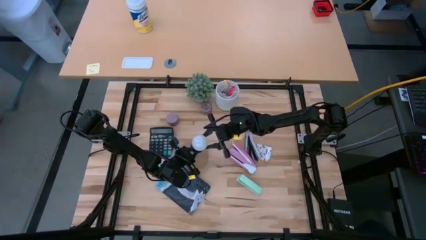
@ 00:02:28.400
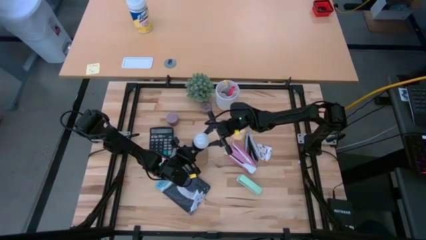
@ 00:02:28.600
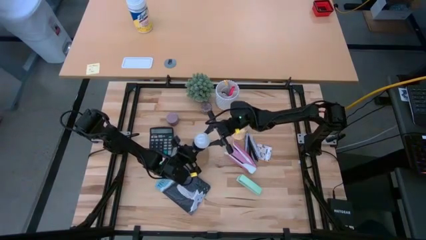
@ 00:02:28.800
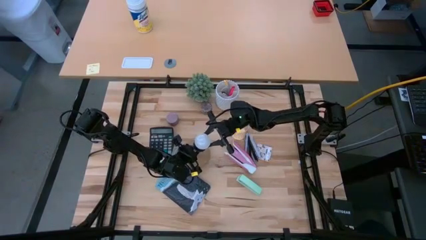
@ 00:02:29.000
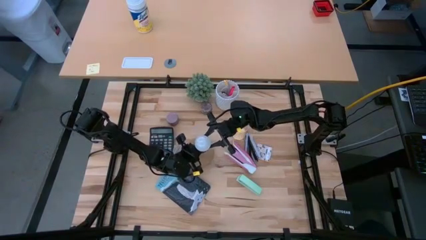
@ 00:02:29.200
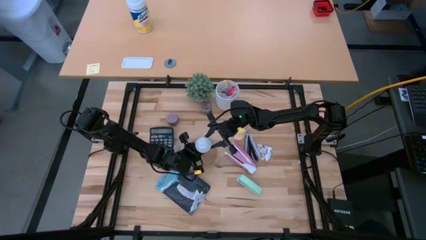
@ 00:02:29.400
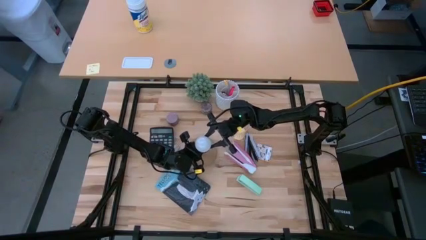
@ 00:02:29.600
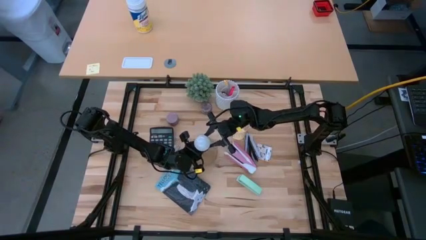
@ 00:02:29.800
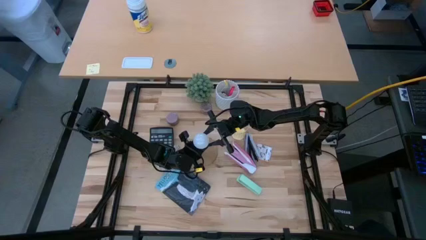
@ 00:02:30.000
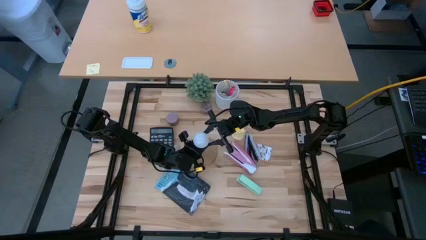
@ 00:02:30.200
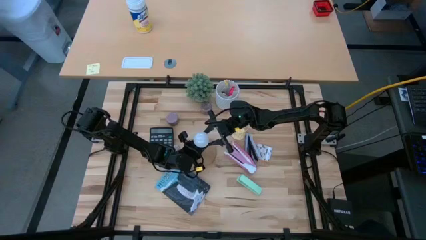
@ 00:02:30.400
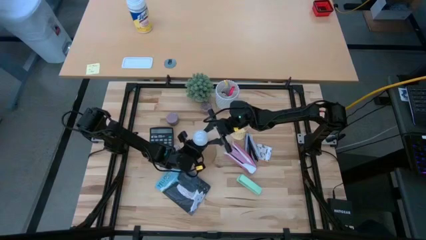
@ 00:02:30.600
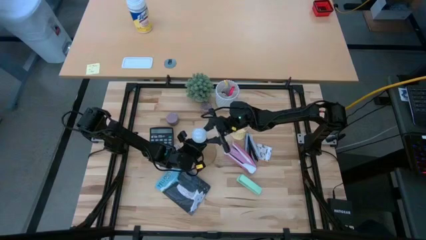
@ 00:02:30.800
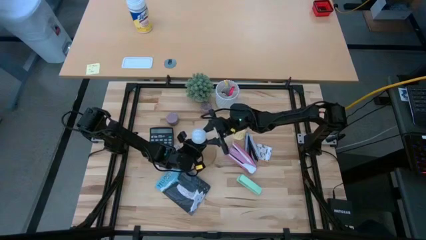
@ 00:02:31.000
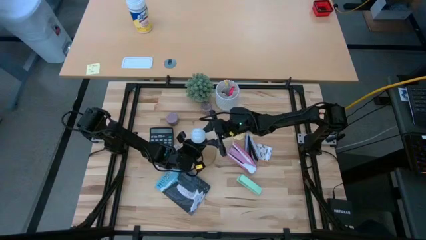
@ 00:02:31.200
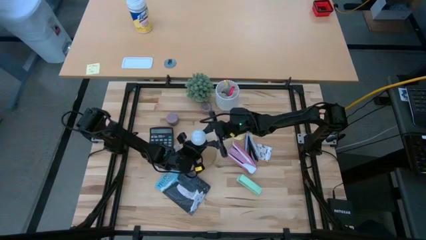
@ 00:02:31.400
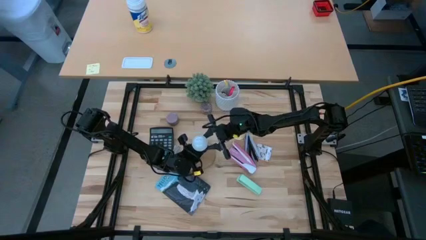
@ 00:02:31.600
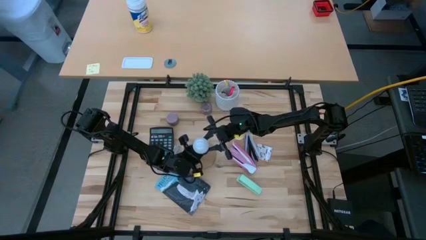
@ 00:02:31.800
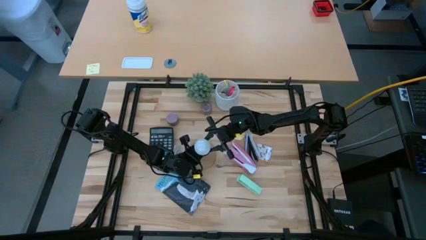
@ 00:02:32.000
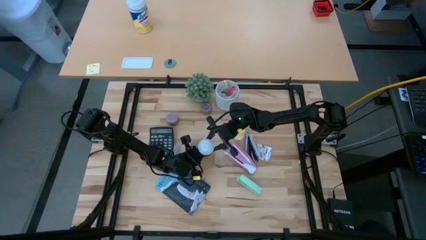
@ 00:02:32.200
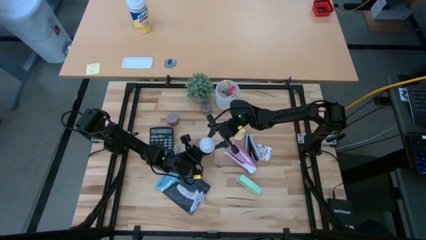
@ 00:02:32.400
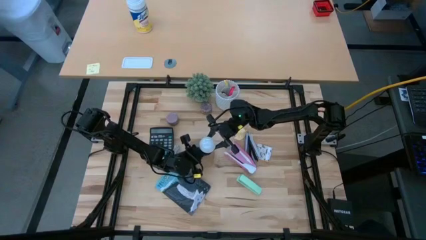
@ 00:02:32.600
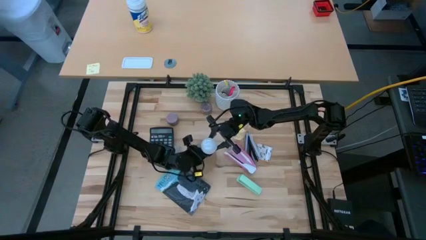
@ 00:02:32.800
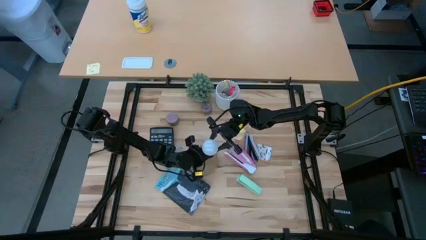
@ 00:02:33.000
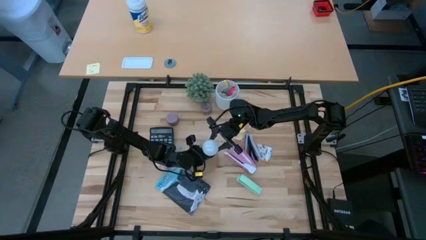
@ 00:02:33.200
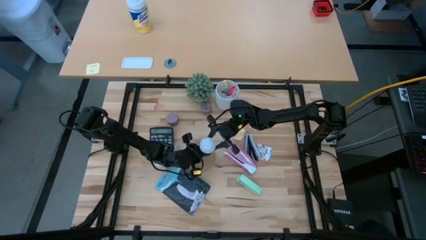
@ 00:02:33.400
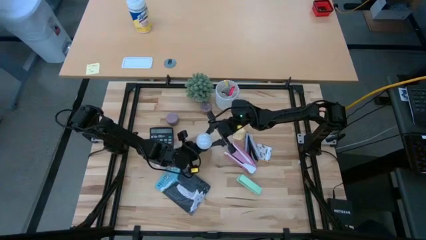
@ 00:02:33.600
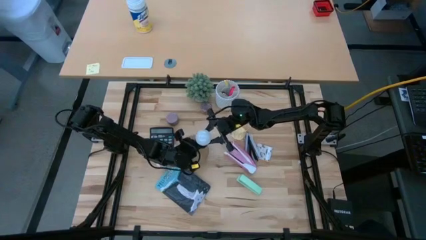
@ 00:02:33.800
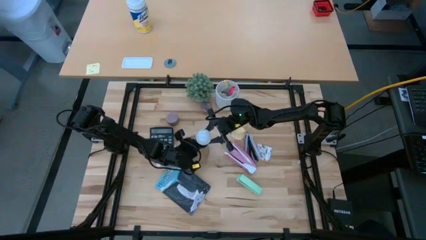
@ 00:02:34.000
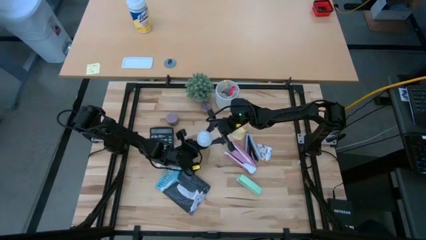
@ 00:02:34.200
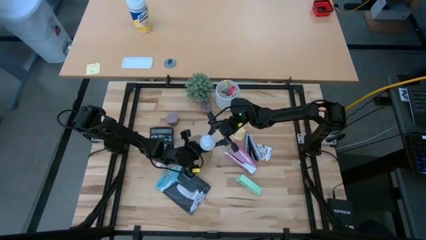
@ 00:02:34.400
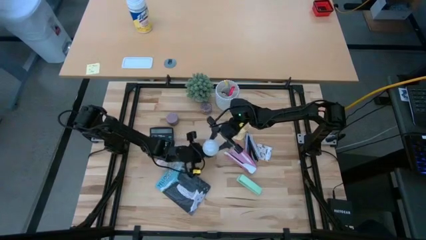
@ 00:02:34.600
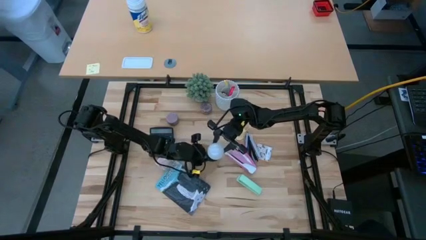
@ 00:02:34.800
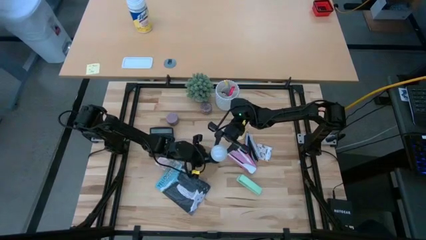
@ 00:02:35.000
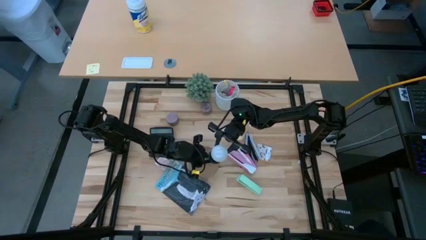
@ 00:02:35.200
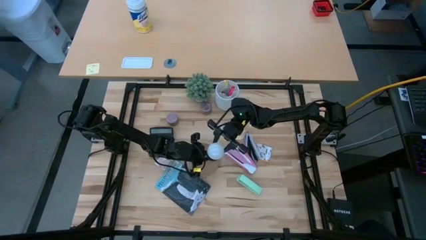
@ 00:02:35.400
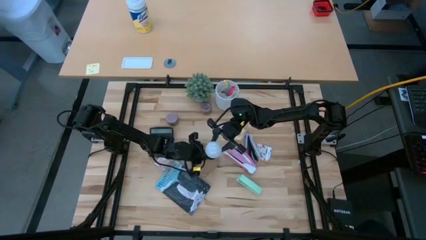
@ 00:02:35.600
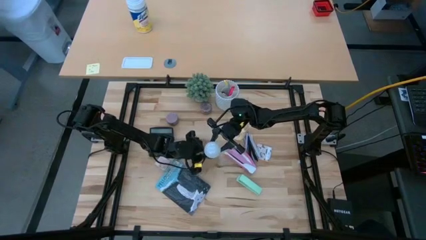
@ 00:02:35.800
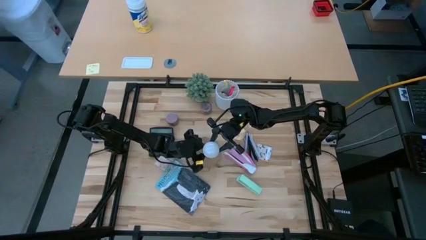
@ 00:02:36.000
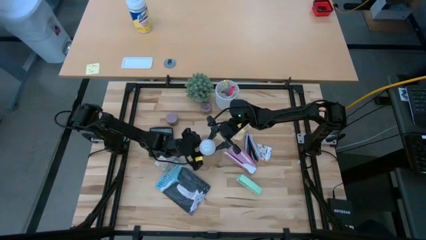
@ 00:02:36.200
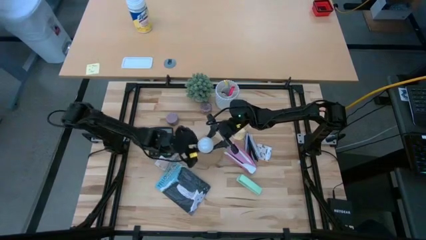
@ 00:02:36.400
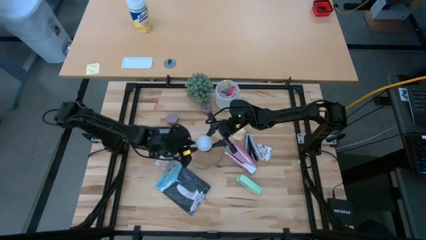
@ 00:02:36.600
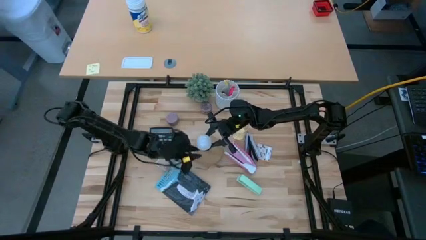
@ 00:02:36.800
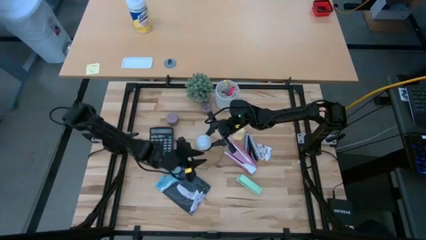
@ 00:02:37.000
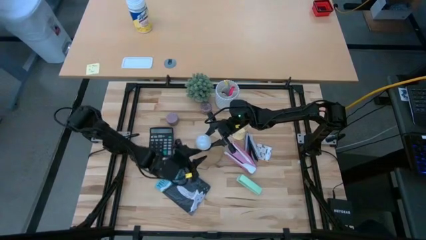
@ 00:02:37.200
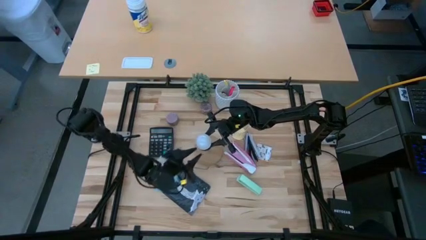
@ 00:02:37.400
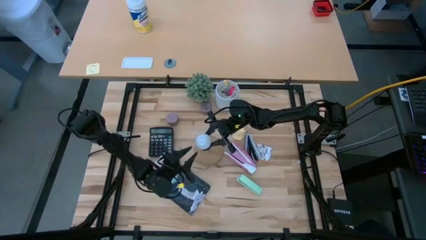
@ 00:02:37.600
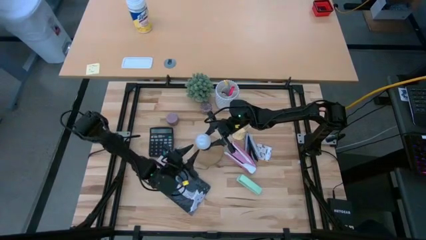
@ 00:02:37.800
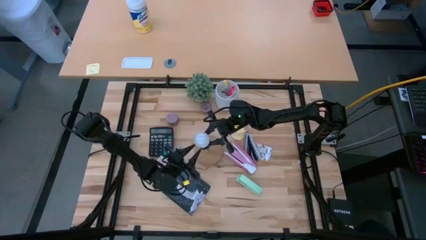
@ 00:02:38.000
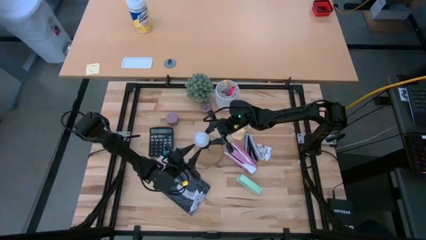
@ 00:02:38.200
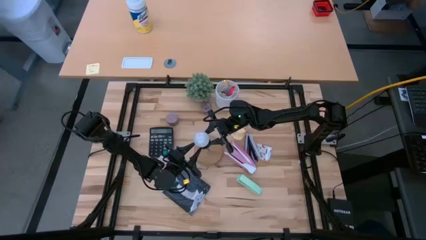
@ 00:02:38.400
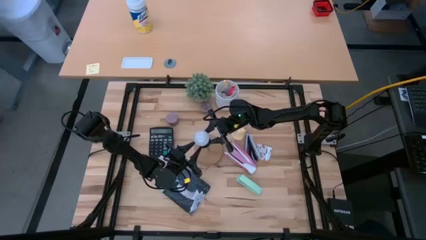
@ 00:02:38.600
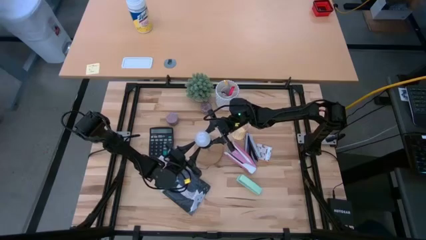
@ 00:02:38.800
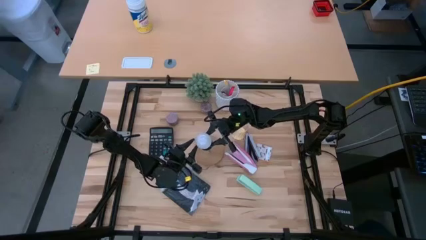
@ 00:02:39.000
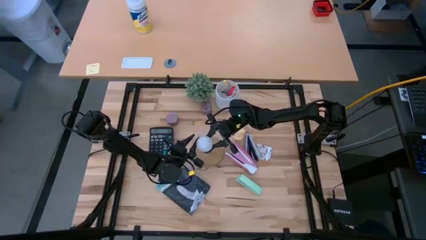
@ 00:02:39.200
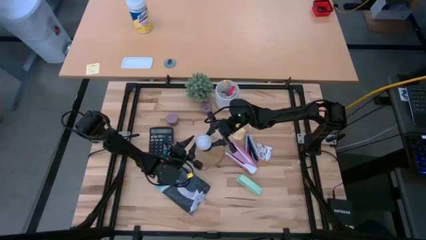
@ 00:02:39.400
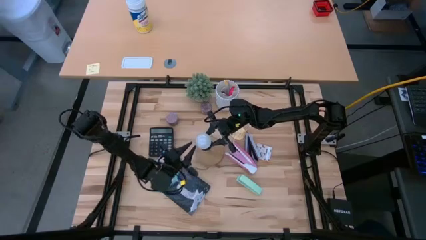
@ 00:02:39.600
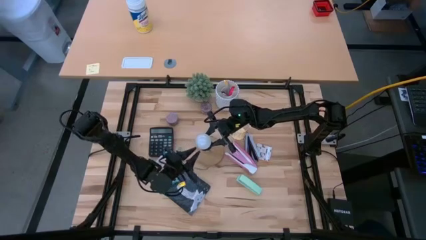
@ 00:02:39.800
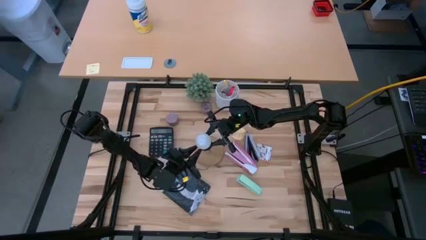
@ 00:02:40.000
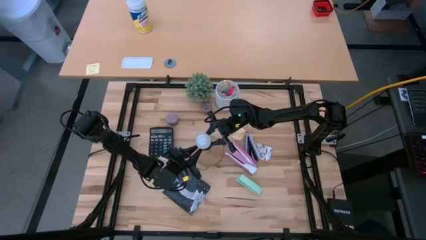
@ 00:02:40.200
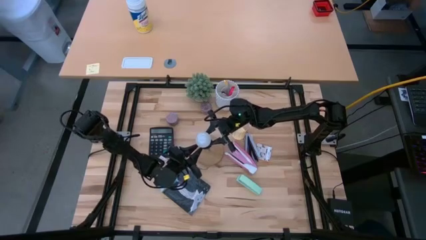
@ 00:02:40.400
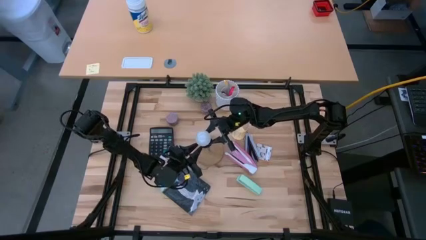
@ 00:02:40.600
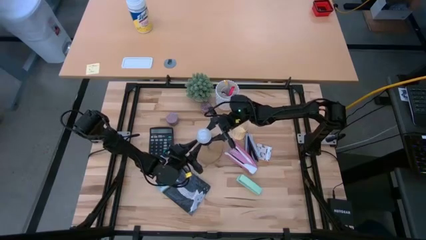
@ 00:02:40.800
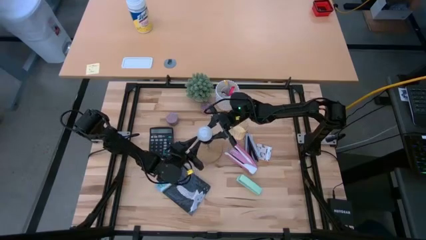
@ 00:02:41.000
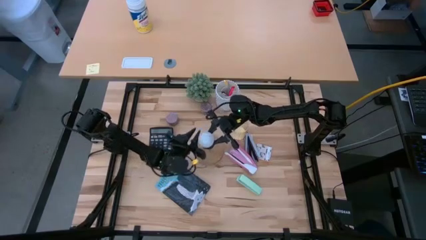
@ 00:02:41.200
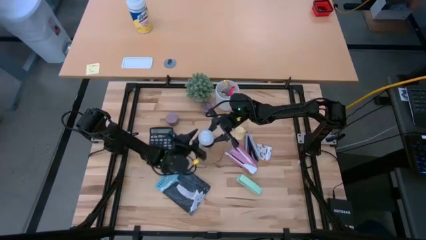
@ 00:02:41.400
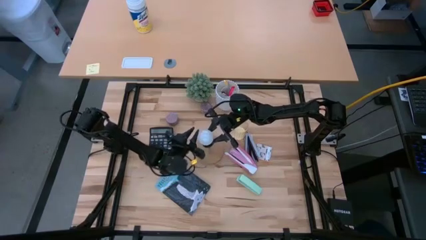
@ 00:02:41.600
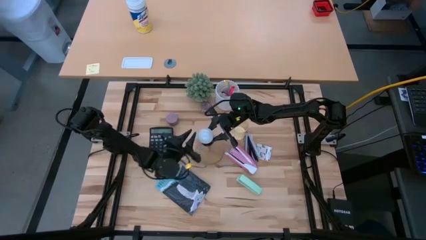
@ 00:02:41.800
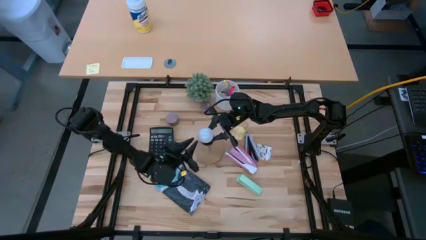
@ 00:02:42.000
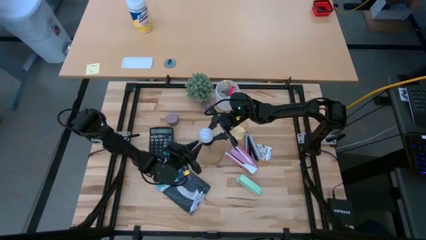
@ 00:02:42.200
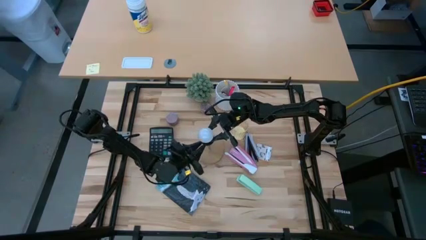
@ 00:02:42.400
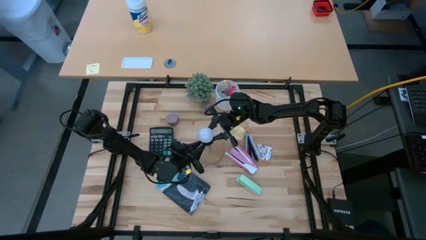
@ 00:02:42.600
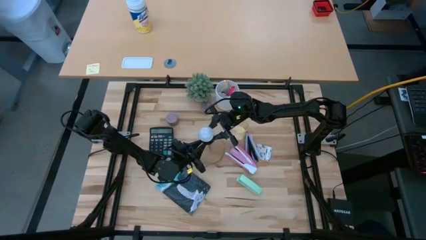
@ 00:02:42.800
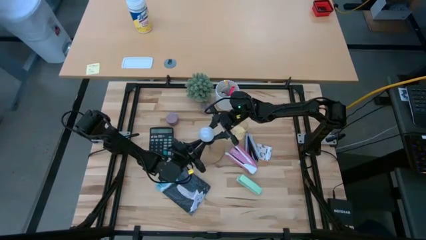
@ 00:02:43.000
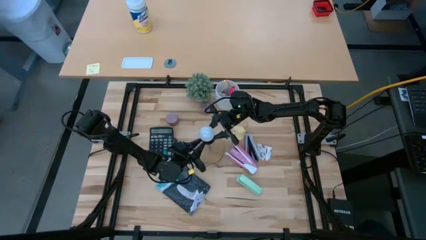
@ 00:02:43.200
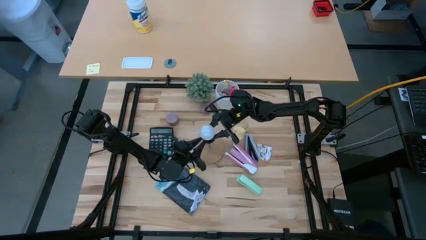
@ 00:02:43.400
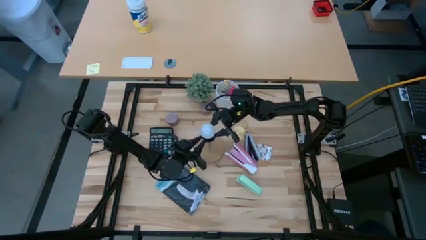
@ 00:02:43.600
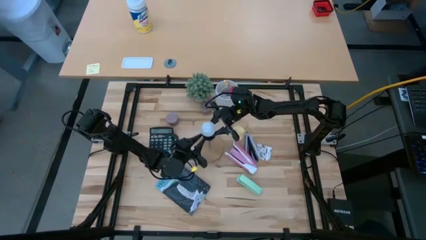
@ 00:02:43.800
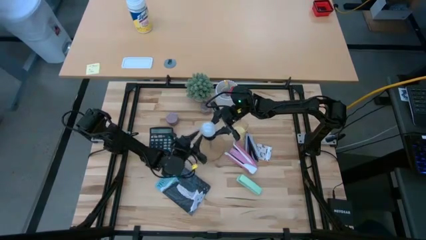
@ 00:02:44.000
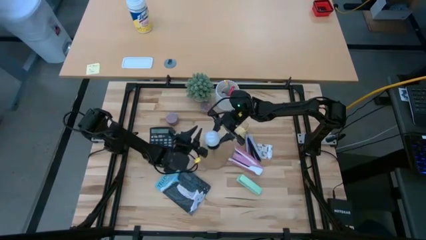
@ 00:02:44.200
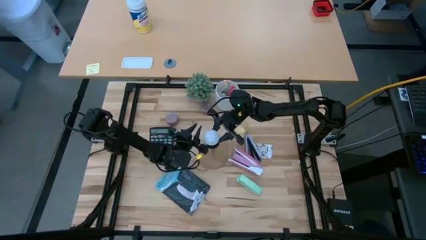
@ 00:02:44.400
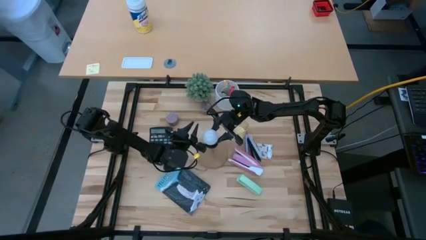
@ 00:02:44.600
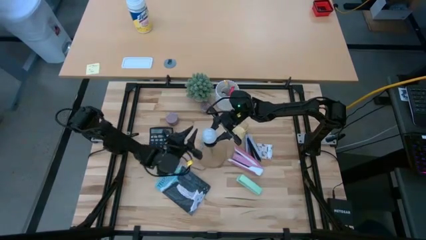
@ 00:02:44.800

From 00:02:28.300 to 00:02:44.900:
Task: Screw lightbulb
Remove the lightbulb from the lamp
